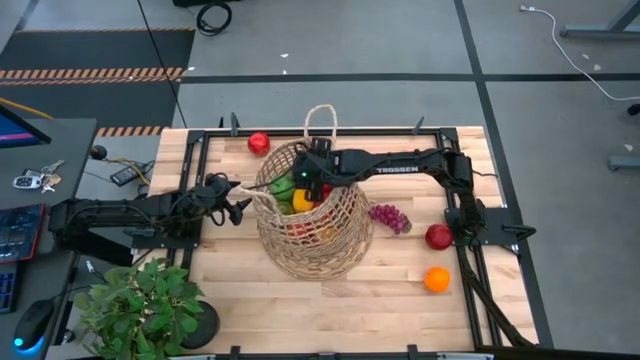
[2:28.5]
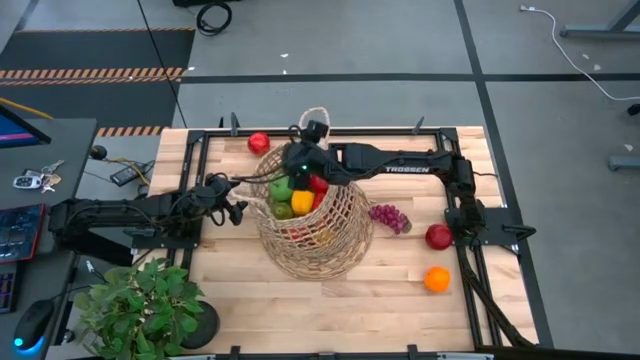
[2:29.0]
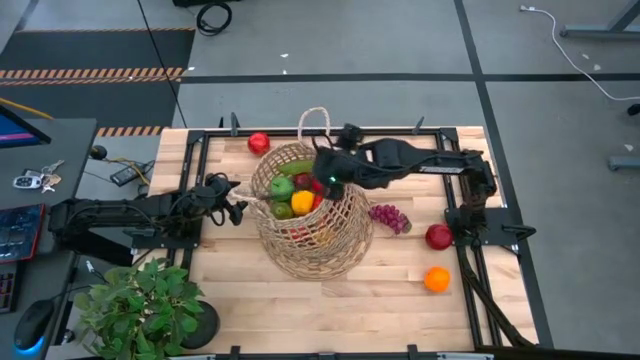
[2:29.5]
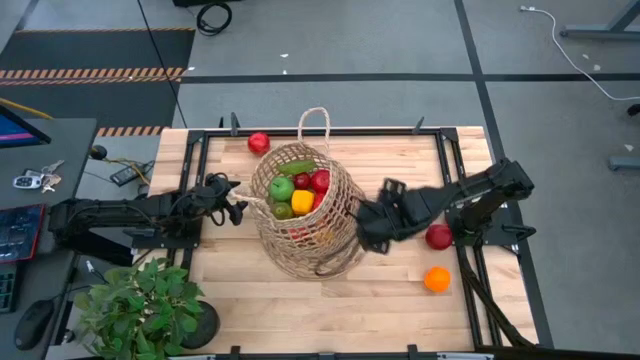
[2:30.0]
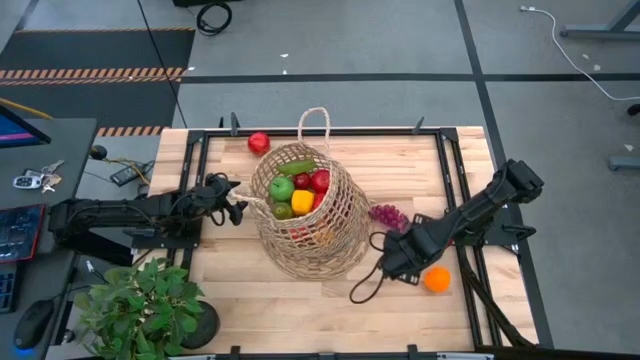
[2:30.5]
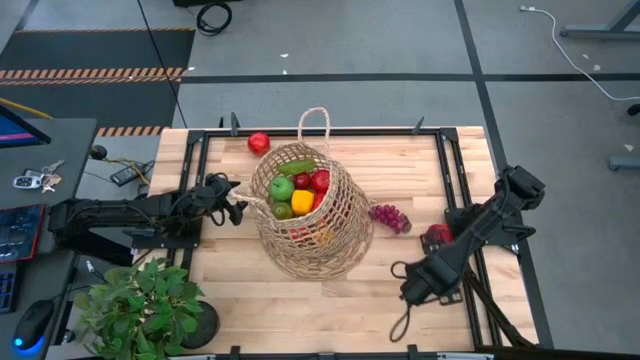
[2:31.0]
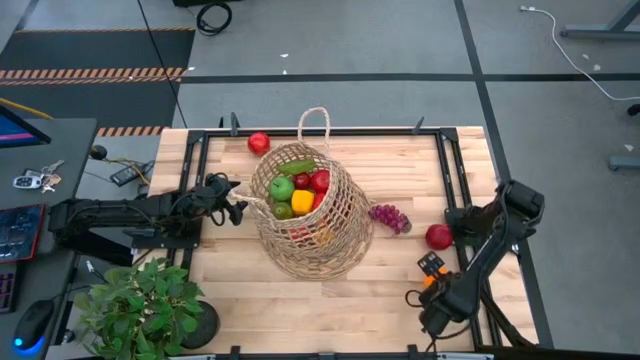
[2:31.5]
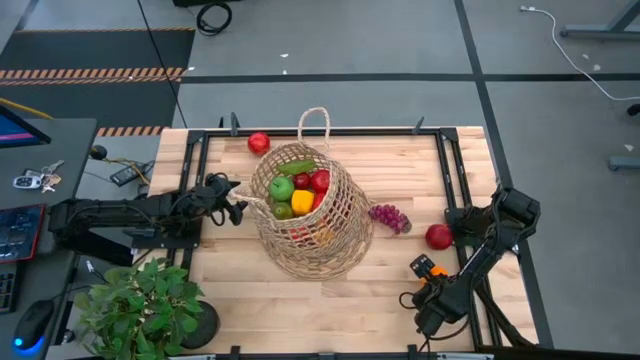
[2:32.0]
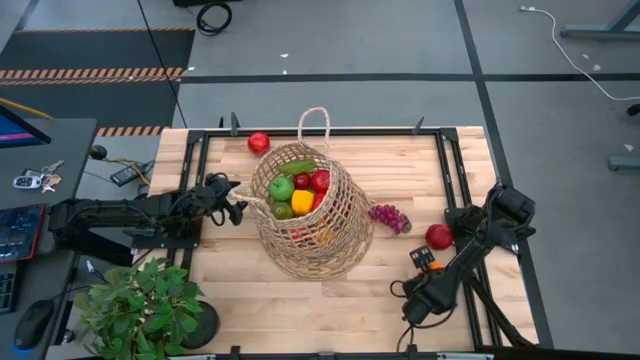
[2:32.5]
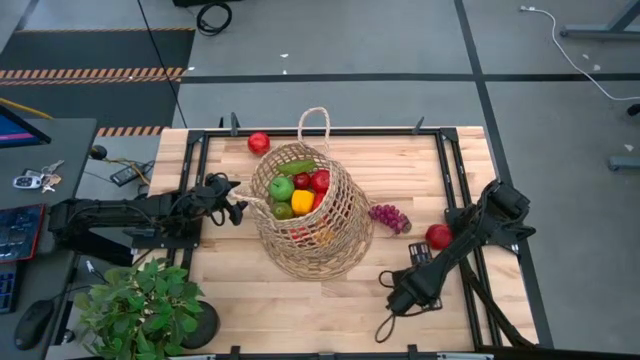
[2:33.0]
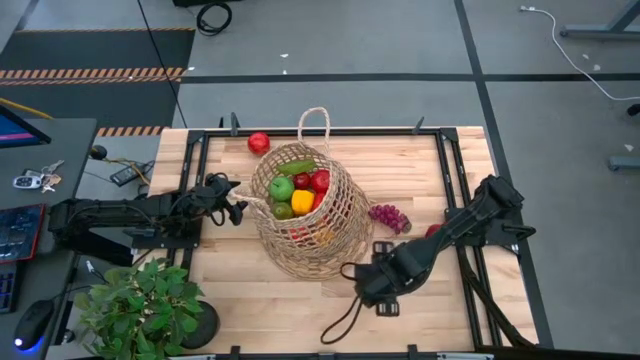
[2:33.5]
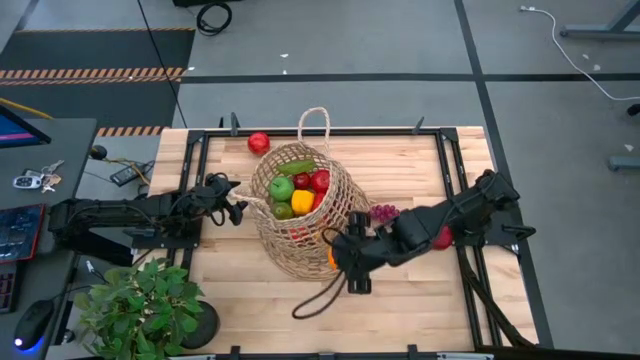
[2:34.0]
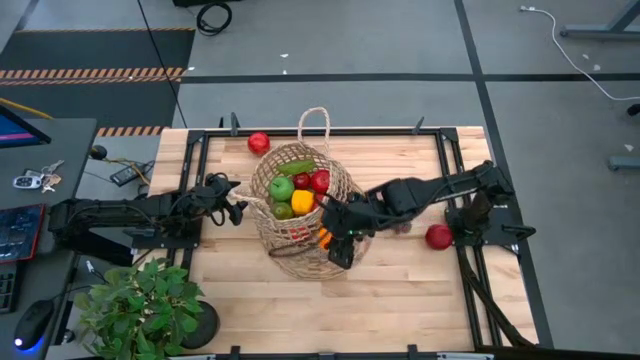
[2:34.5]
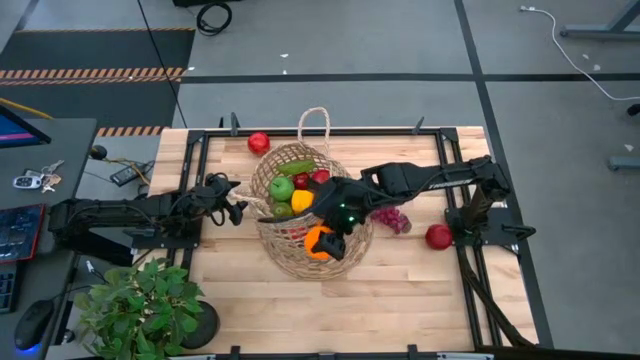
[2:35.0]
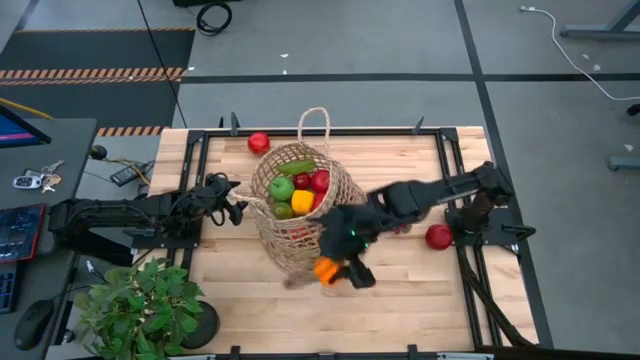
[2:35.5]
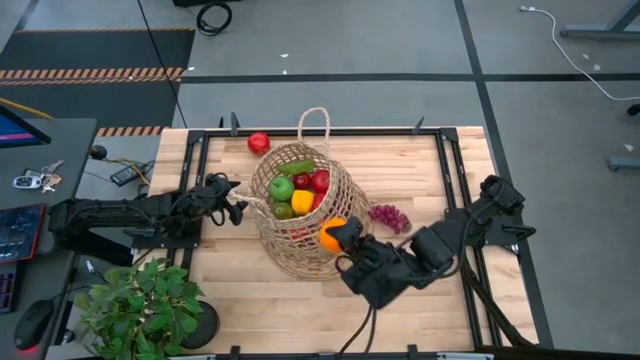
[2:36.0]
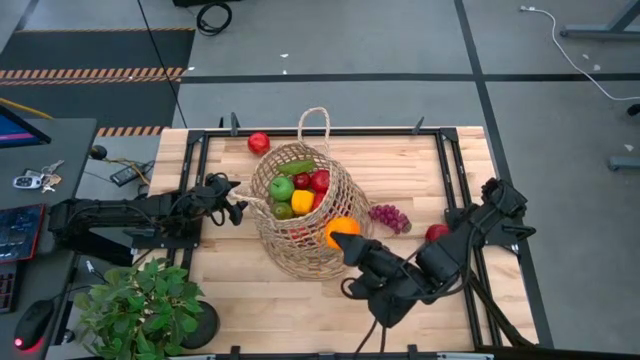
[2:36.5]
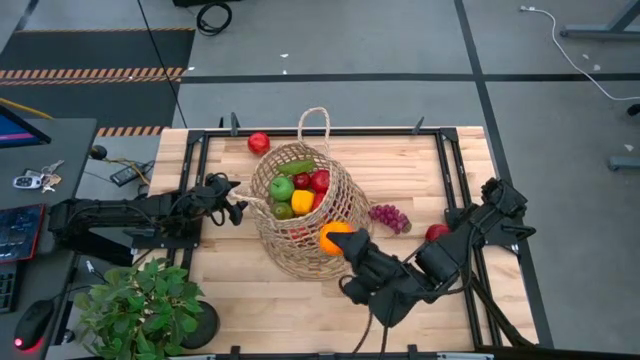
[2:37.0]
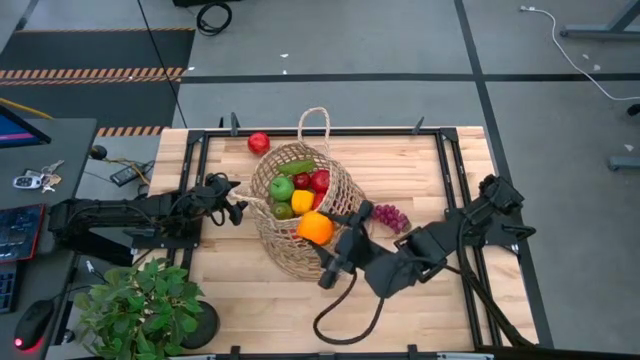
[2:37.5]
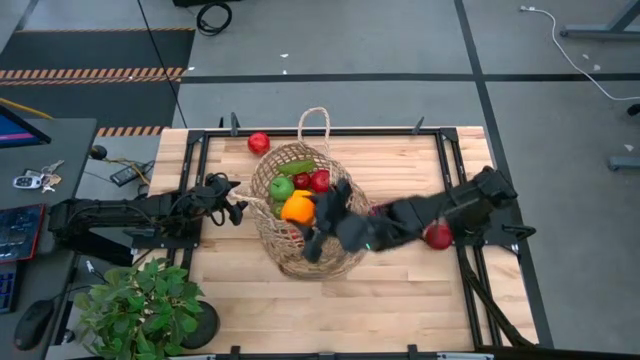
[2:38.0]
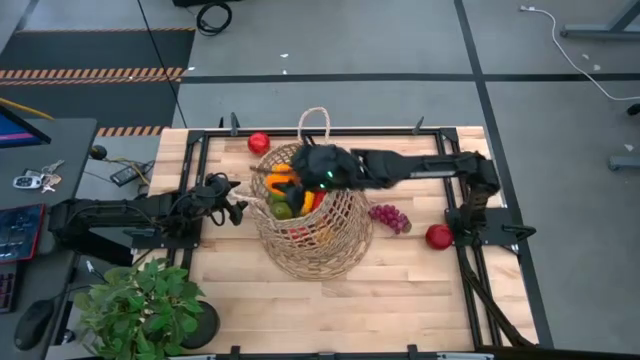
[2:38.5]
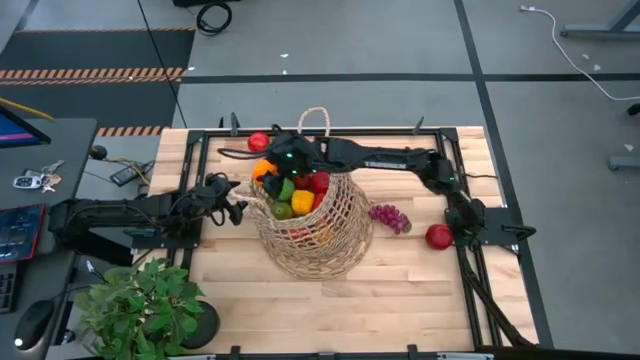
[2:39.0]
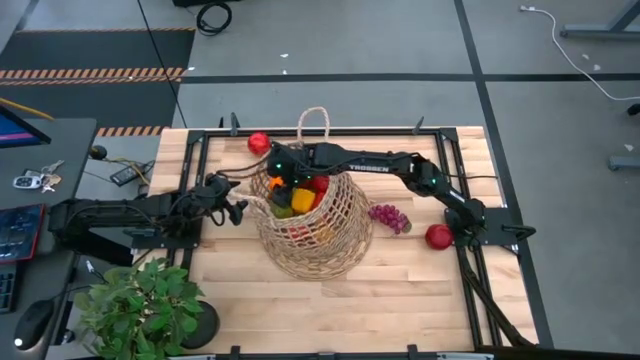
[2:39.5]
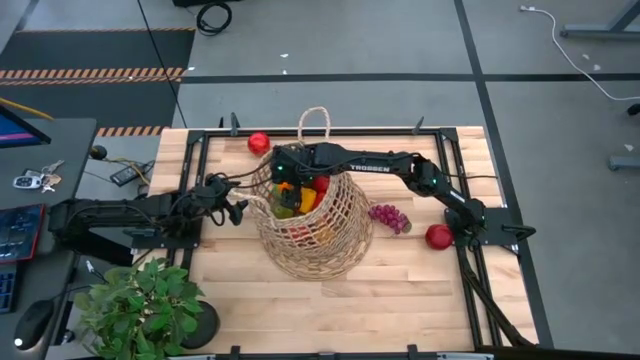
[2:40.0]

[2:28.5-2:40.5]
Task: Build produce basket
Put the orange into the basket

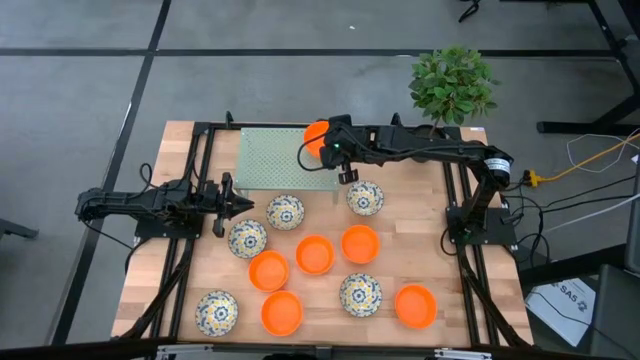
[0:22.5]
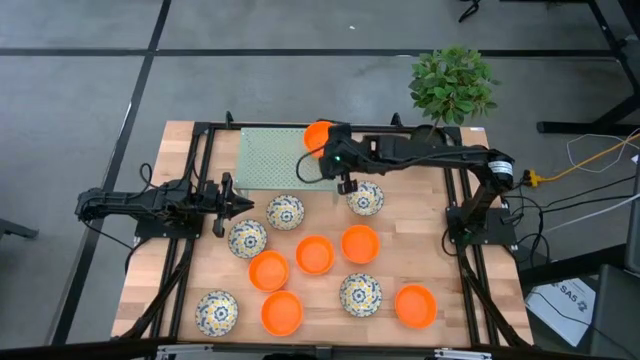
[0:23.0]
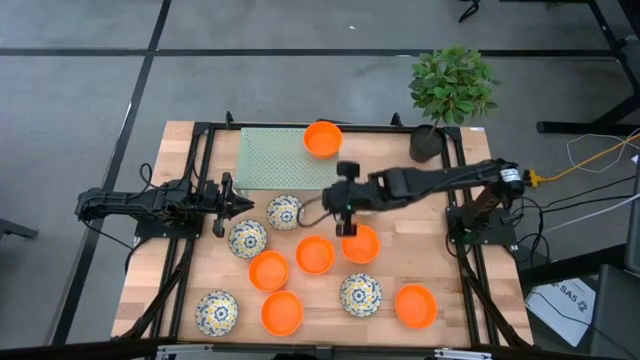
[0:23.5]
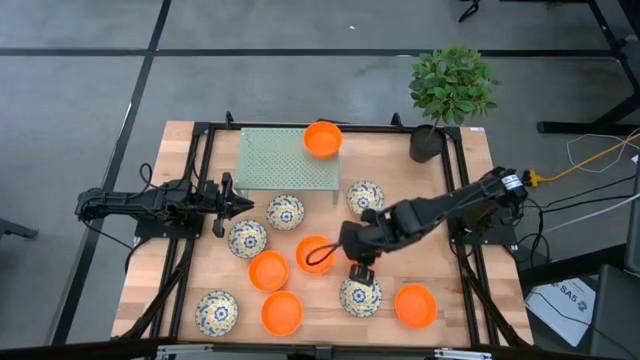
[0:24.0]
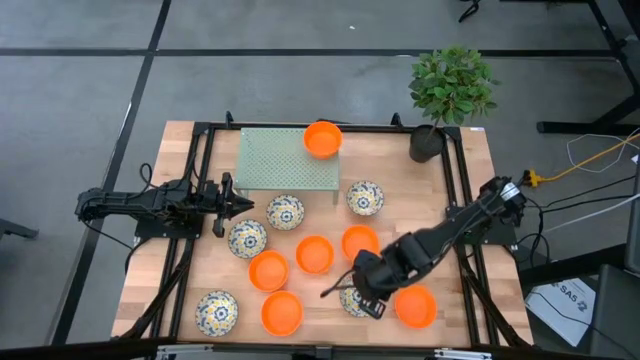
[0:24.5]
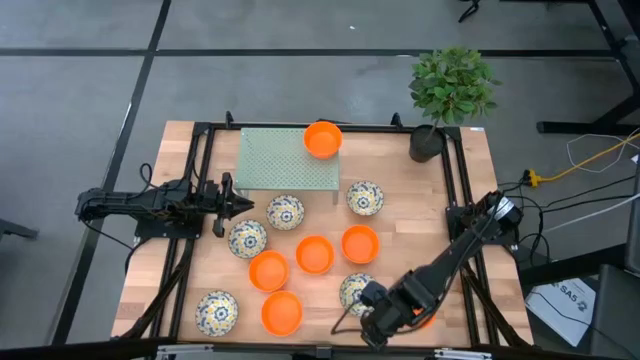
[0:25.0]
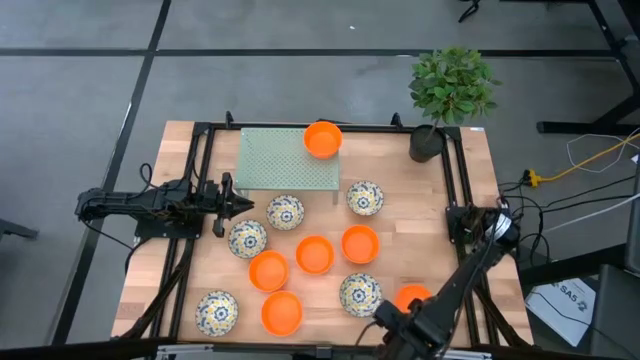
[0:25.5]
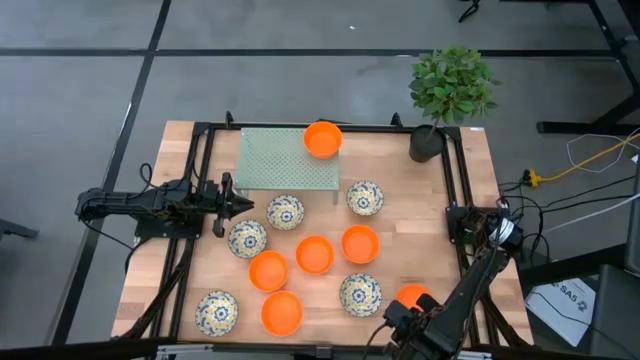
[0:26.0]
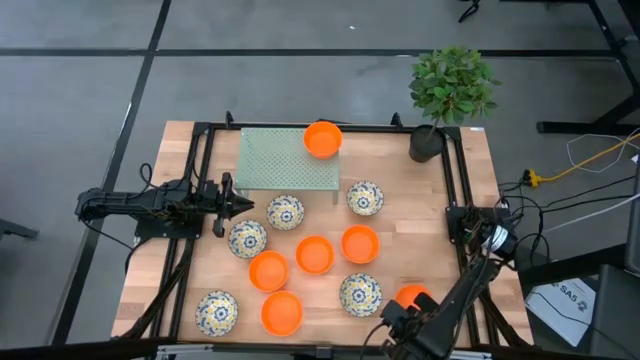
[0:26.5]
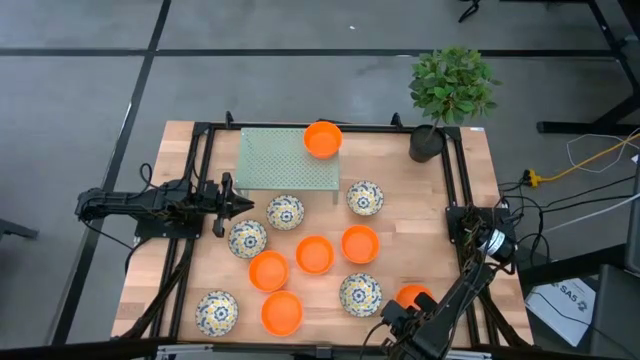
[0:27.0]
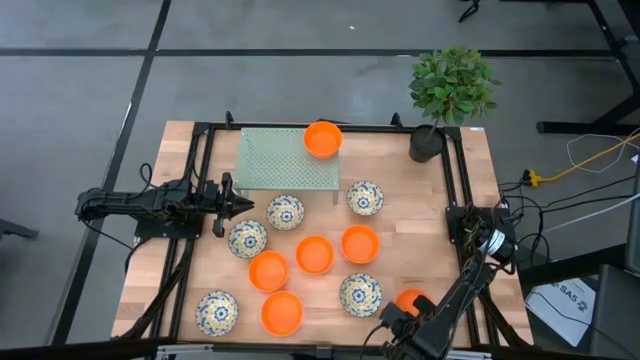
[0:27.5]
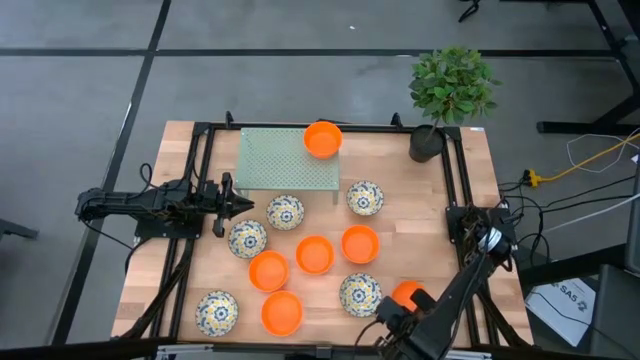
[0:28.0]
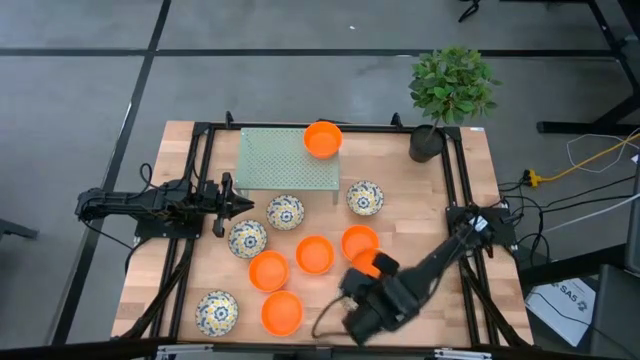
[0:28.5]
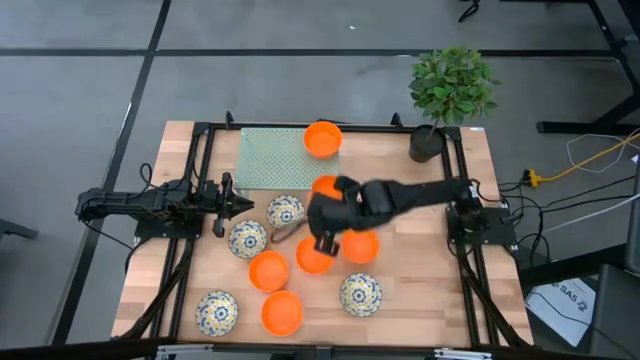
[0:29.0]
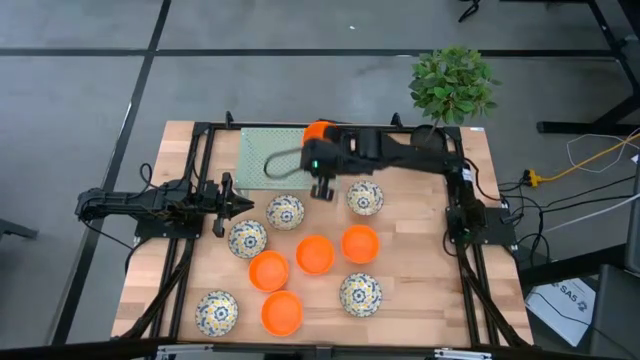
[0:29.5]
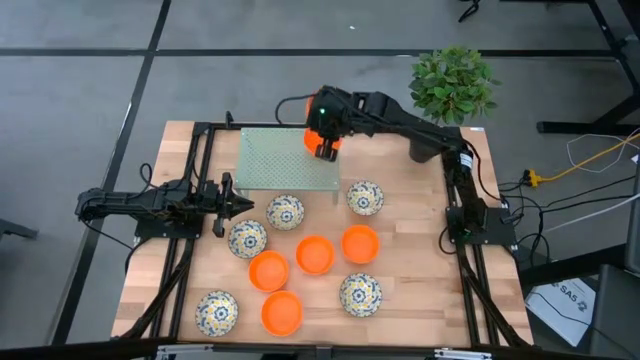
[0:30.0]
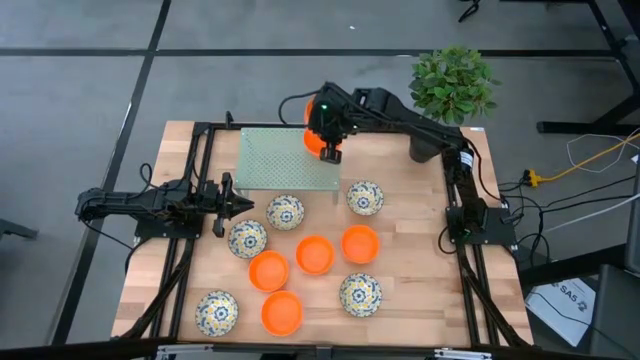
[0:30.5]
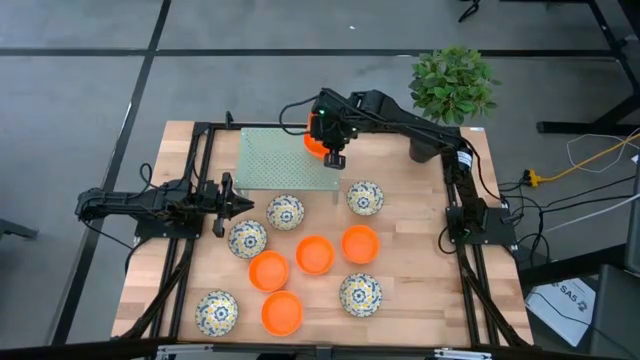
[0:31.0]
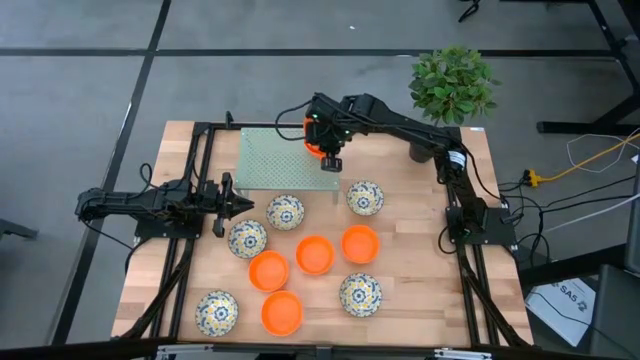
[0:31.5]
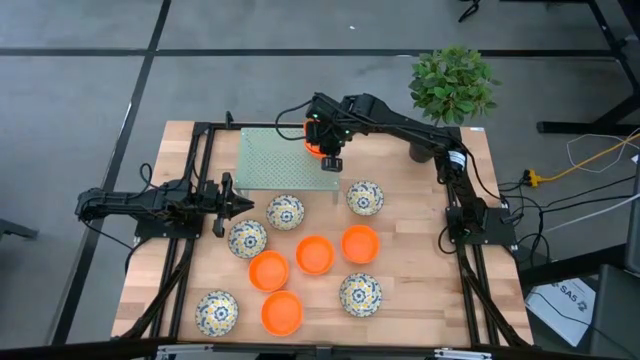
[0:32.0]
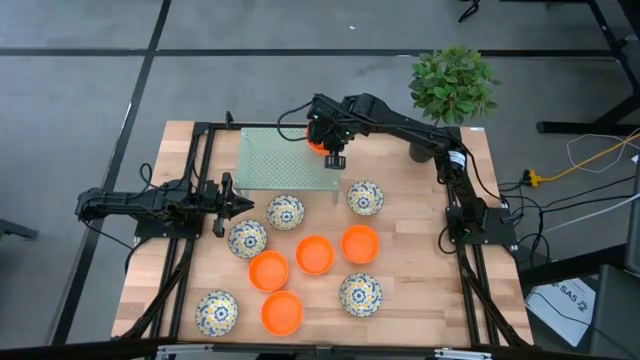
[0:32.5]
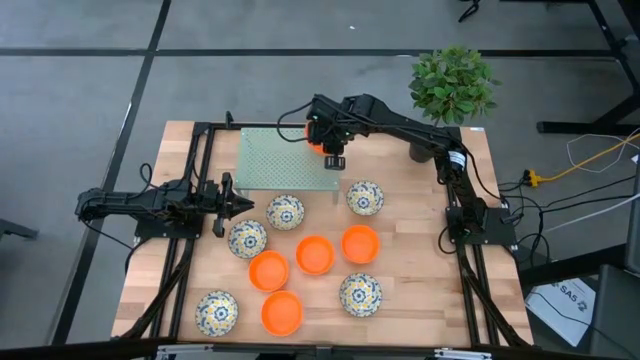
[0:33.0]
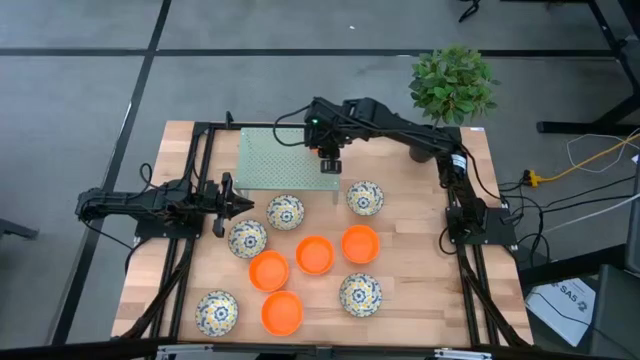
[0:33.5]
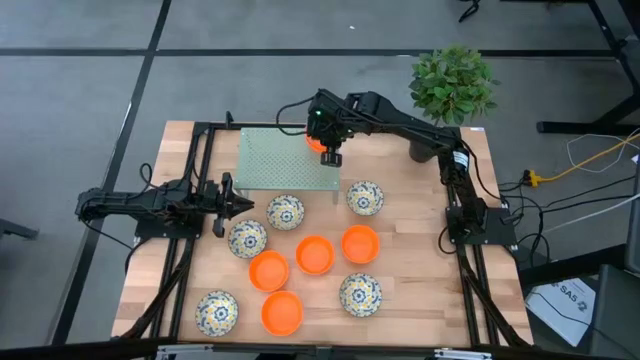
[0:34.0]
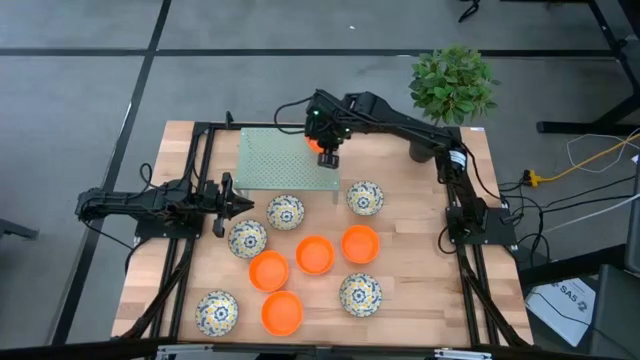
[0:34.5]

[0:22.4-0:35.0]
Task: Pick & Place Mini bowls
Stack the orange bowl on top of the other orange bowls on the shelf
